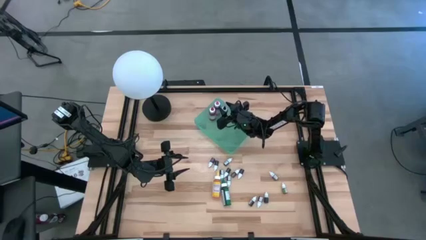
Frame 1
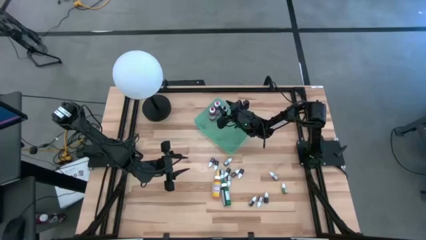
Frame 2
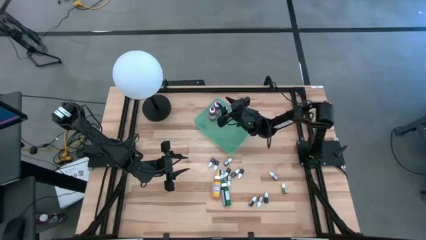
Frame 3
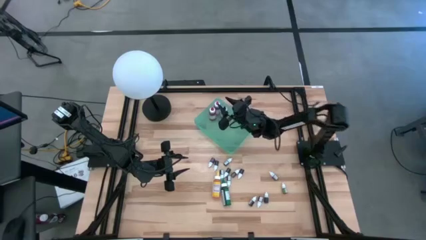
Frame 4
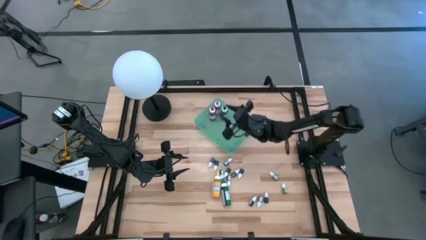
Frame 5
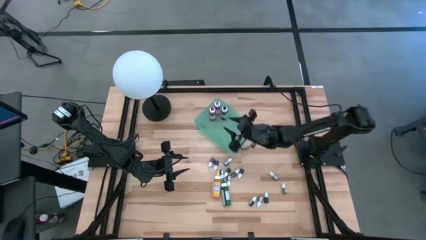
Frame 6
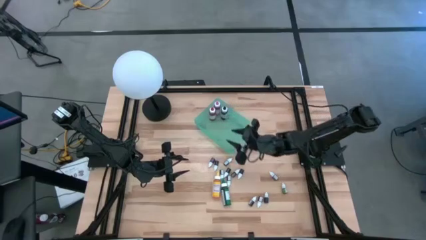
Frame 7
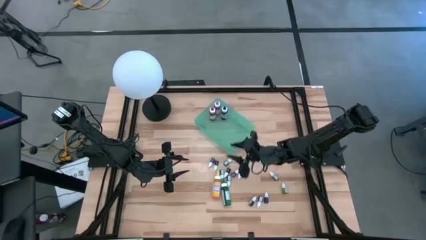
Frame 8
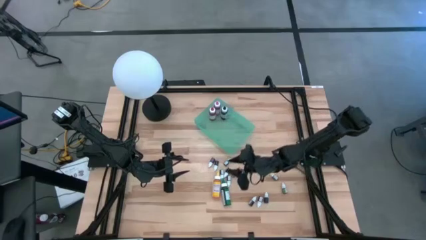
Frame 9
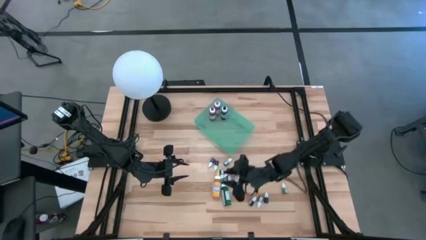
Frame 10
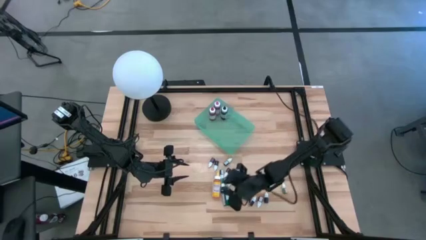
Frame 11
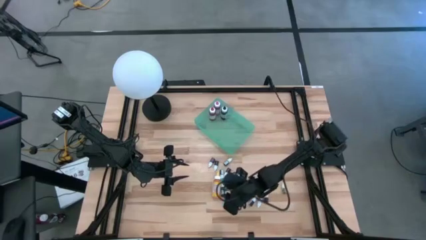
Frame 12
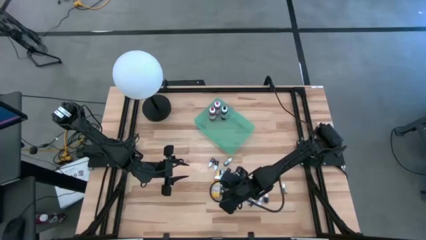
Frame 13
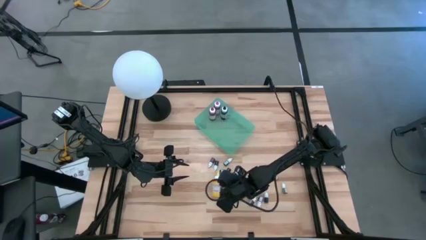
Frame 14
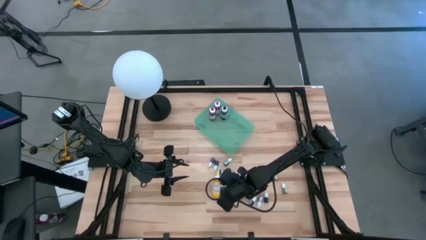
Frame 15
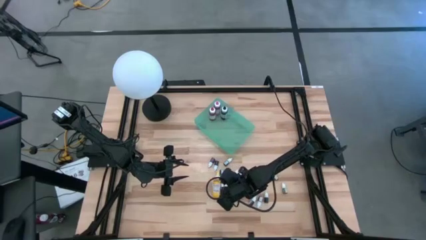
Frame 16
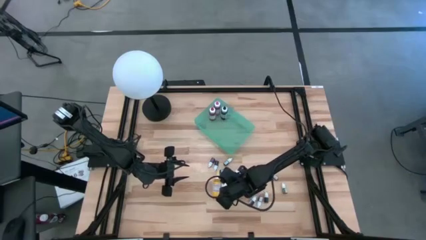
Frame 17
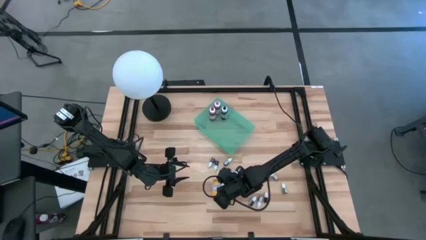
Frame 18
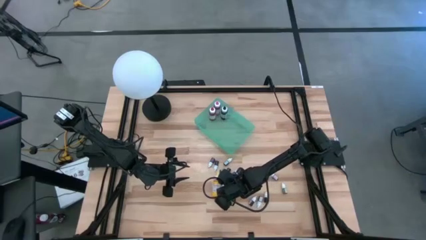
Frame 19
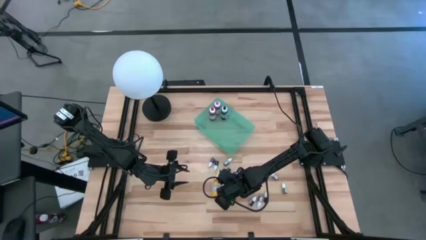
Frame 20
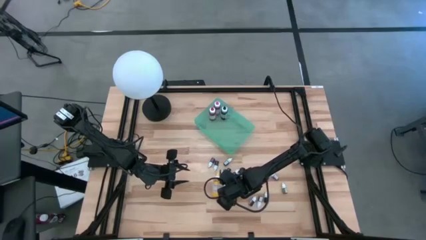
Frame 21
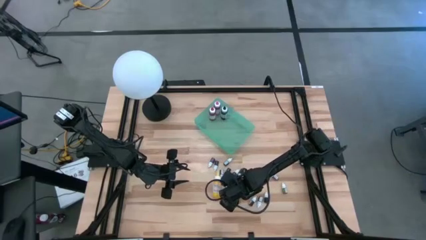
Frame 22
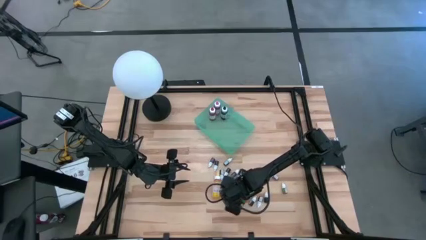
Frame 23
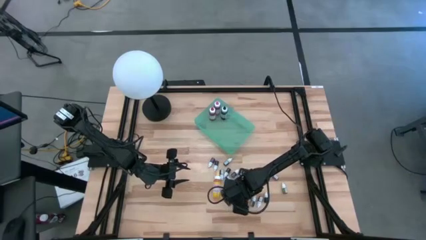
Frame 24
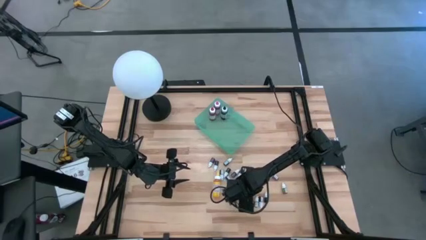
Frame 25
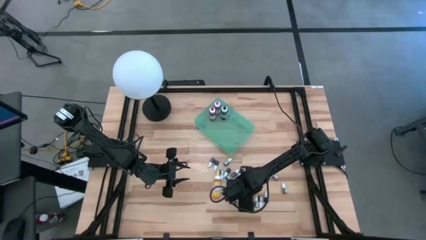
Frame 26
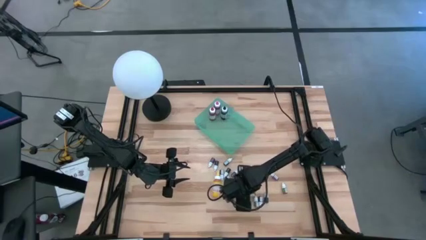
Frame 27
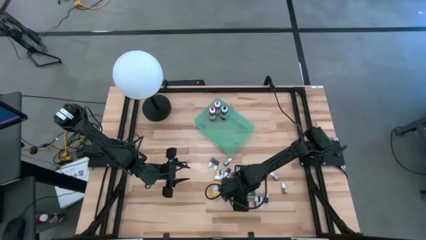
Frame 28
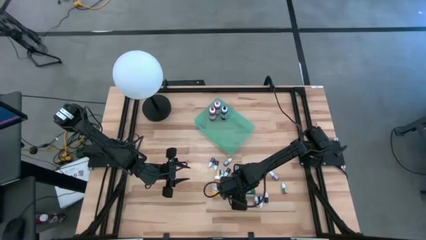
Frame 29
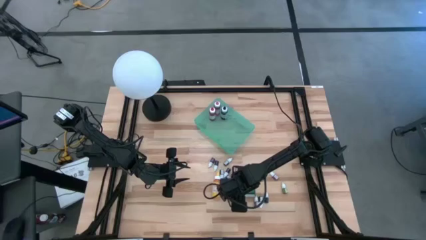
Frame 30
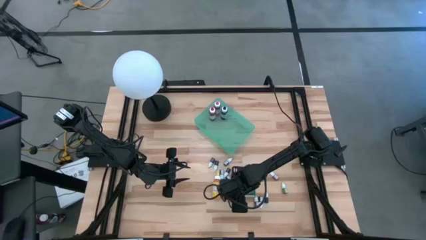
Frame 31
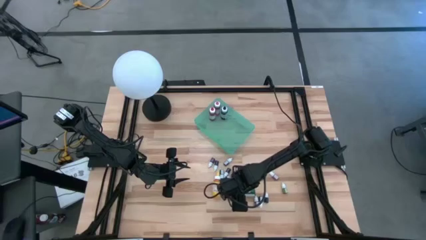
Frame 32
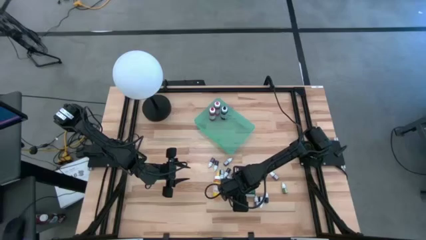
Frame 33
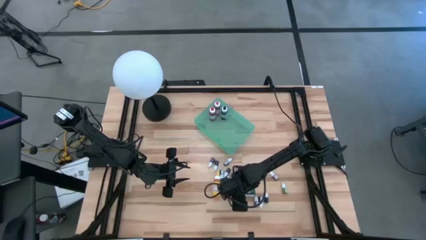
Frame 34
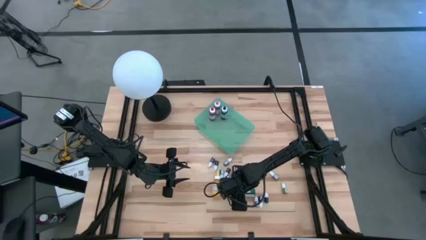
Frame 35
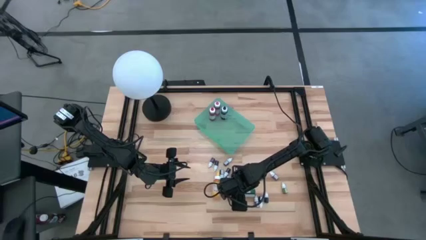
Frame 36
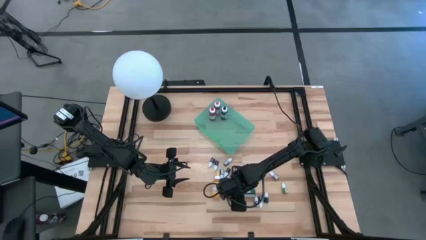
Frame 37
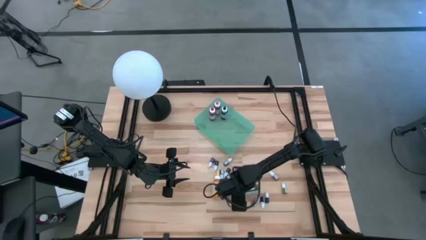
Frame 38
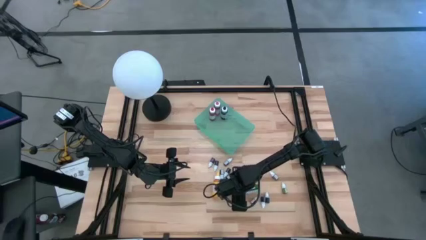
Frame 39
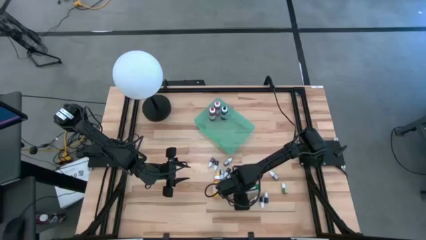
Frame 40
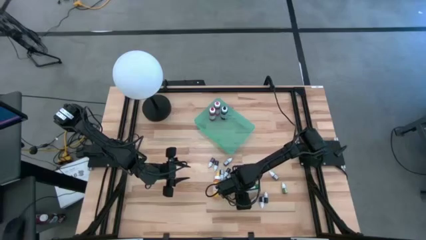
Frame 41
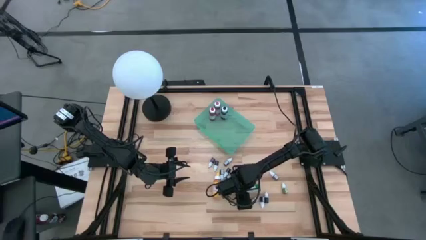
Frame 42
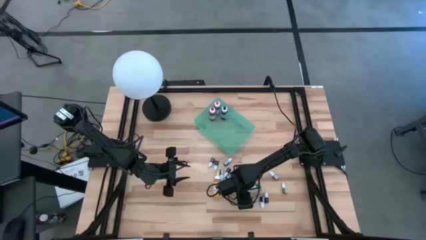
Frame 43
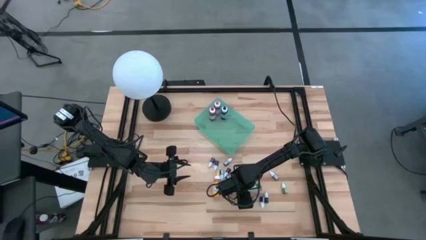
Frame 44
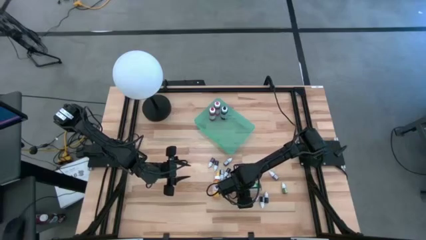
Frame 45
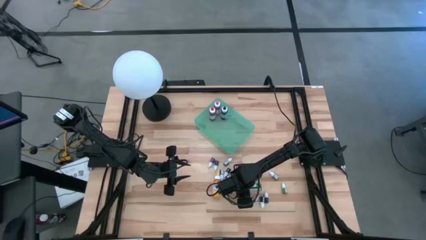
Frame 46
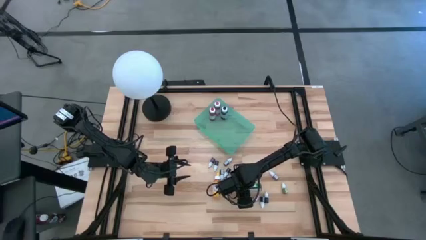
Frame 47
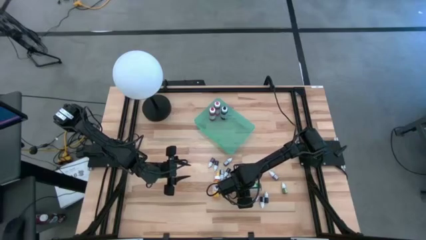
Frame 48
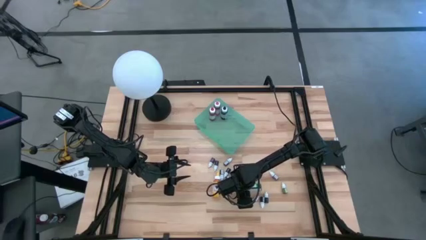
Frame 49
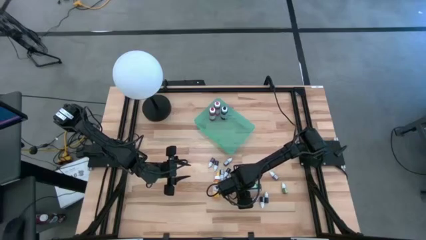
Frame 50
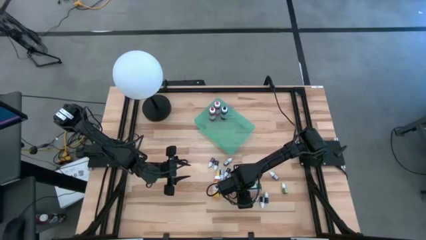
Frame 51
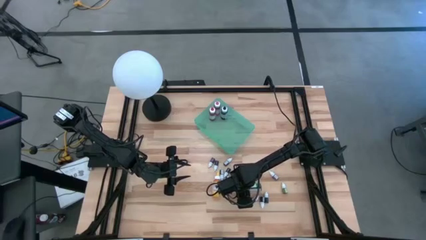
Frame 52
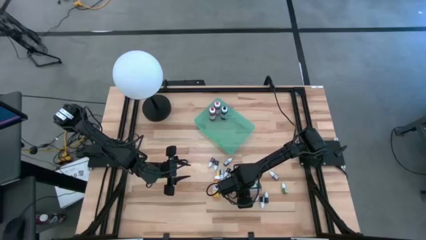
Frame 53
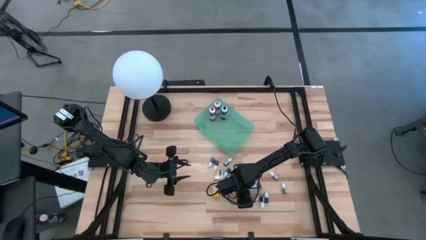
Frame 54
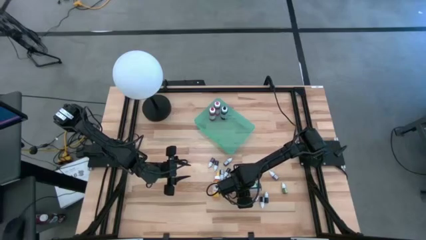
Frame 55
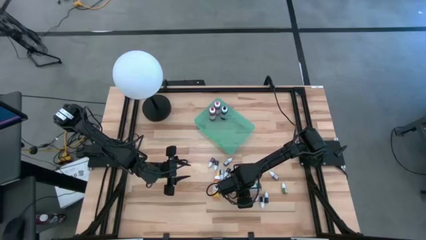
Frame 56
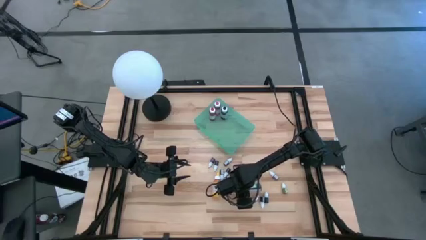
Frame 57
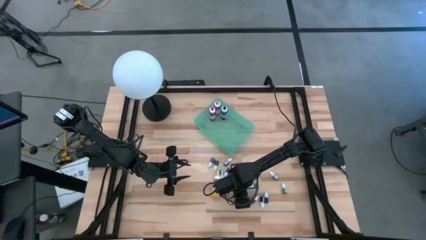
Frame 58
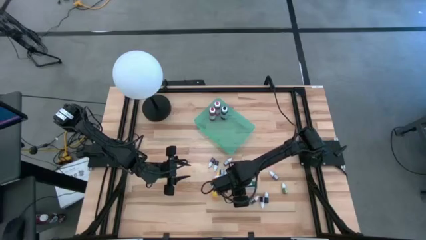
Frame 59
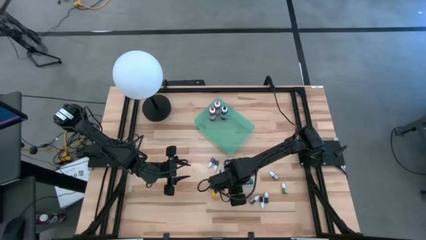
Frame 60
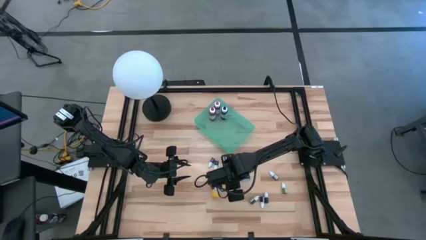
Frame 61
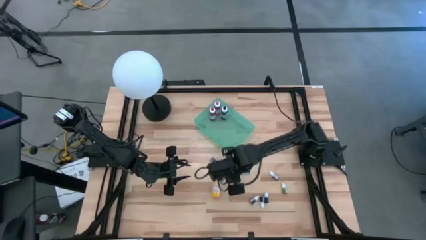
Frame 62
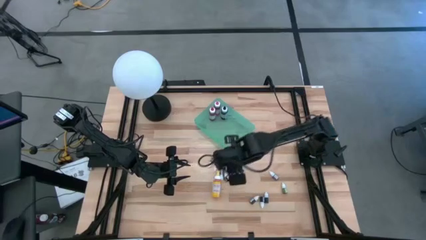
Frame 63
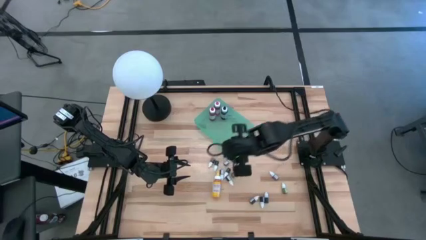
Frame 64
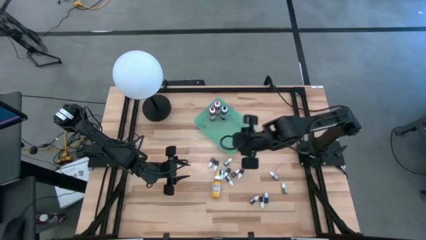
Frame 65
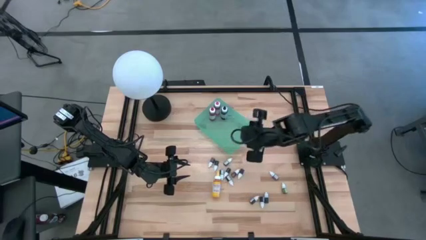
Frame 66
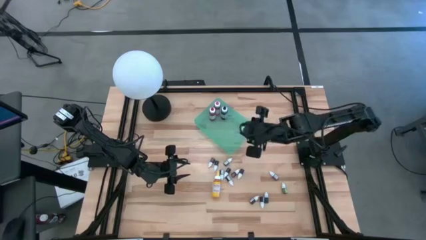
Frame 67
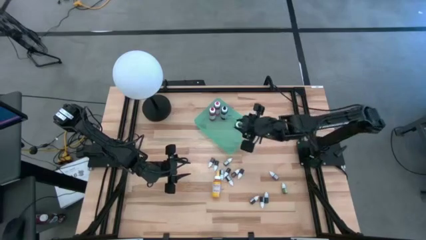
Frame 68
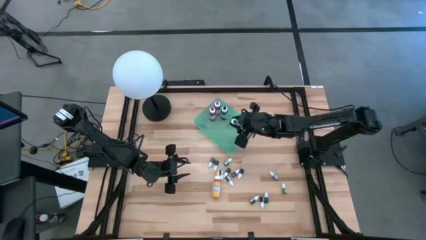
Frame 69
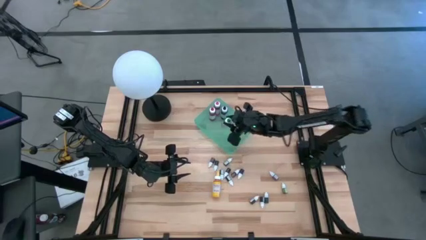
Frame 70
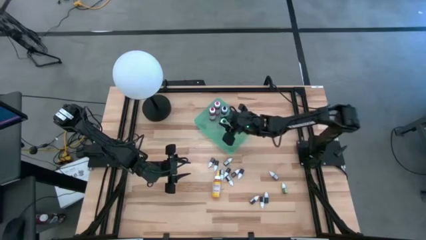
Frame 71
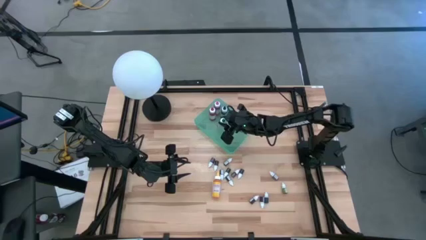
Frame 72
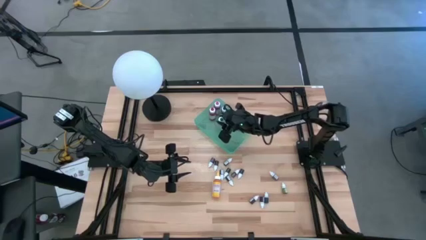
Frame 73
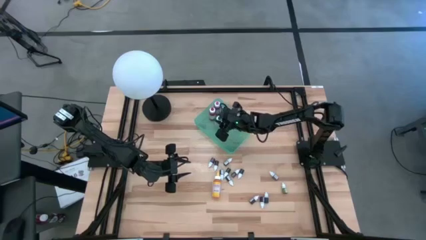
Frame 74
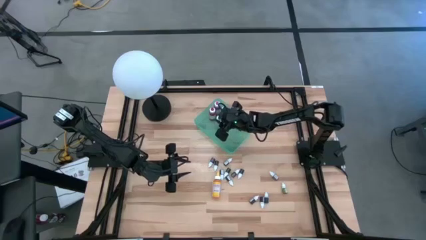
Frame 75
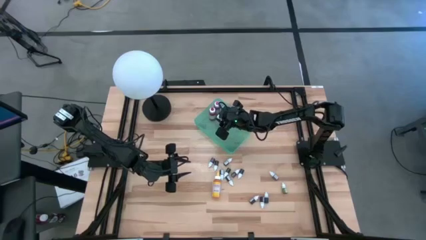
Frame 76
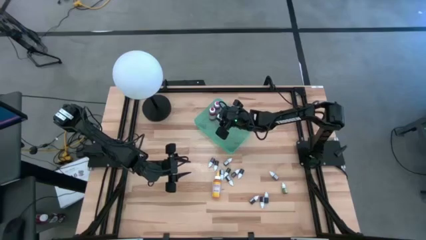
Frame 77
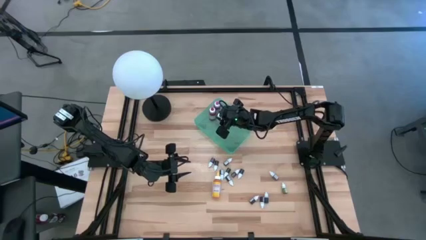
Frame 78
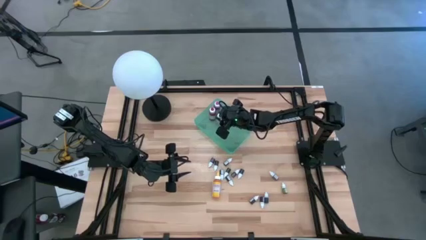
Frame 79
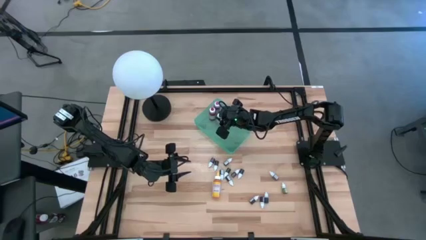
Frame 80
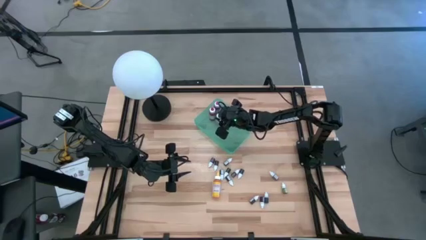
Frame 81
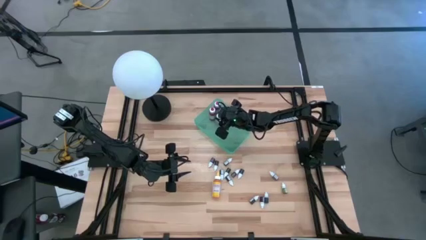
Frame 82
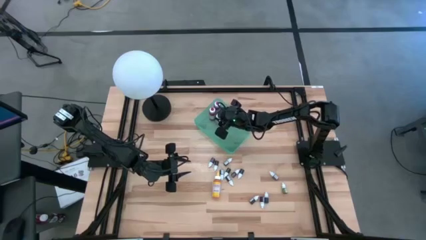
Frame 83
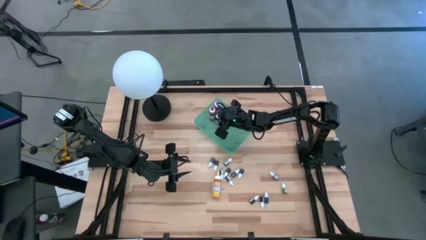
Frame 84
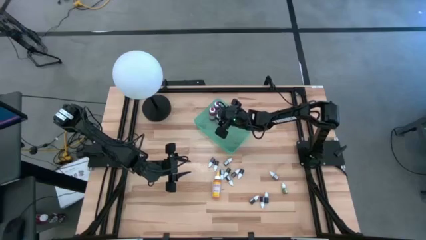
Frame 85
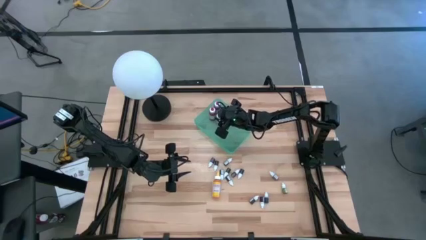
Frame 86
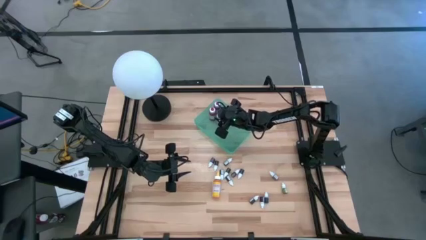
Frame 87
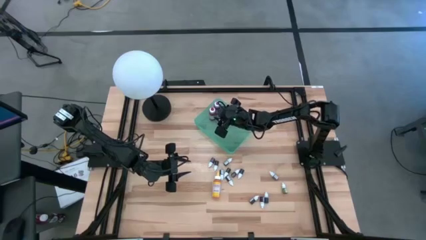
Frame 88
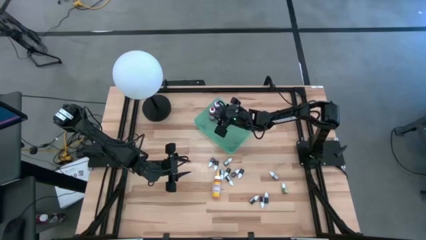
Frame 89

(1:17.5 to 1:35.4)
Task: Pick & Place food coloring
Put the large green food coloring bottle into the green bin
